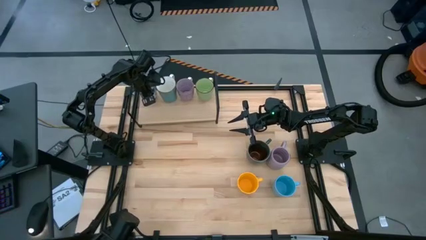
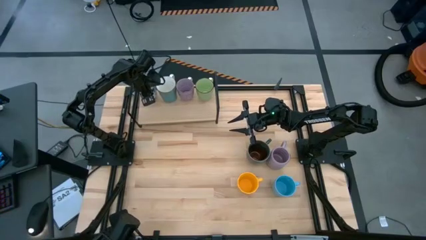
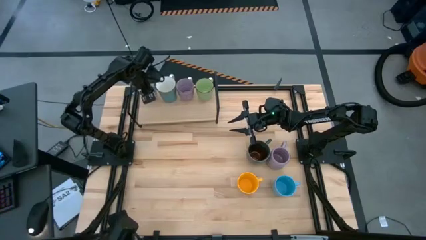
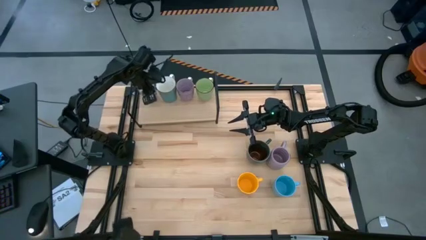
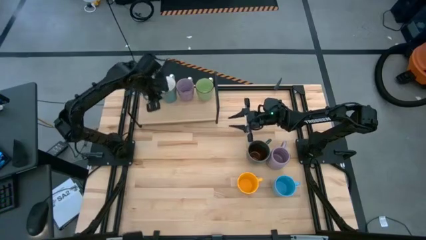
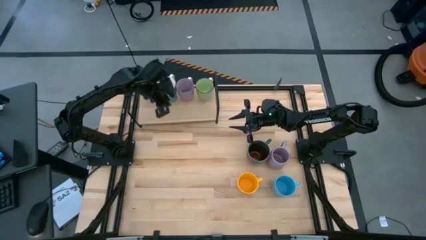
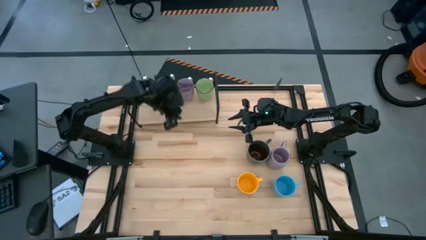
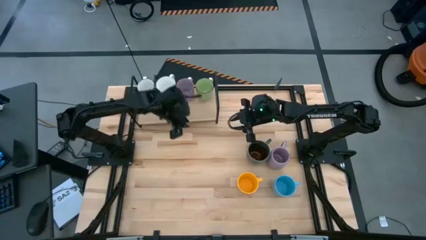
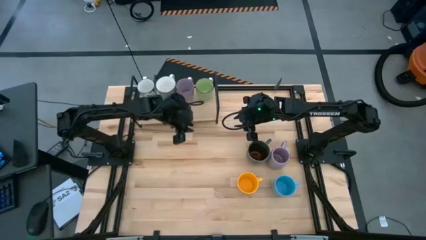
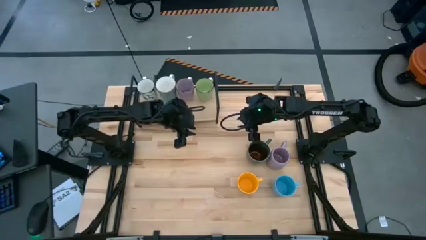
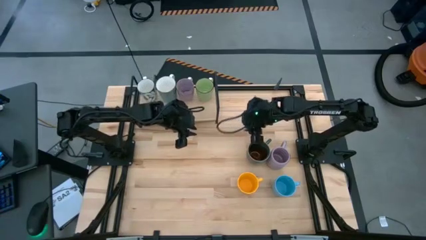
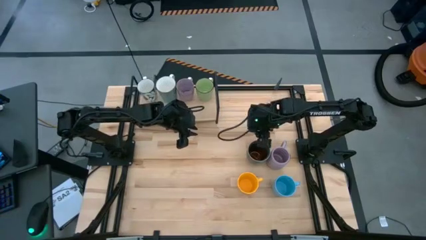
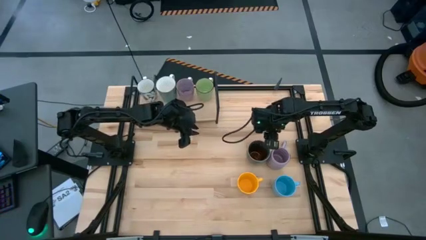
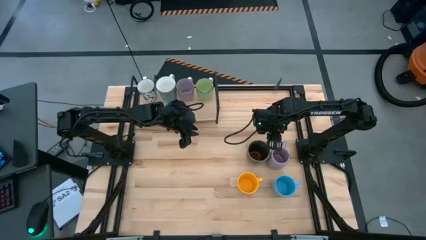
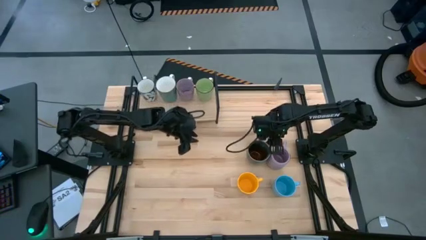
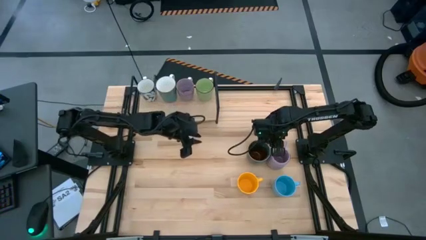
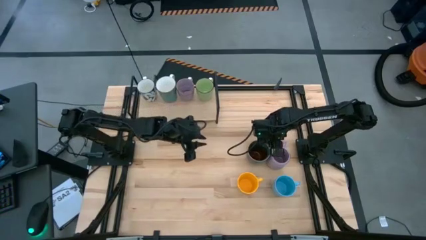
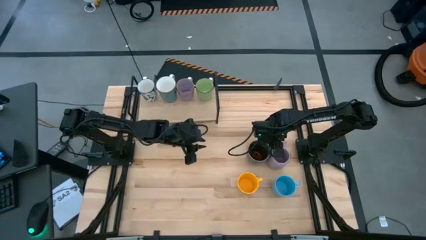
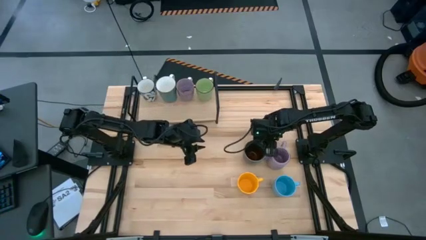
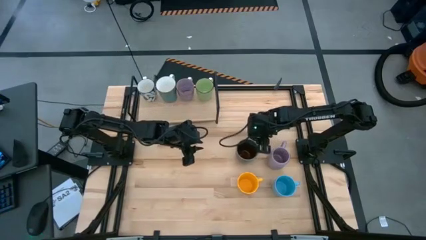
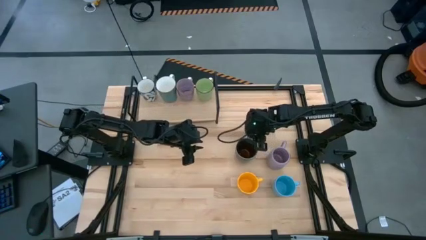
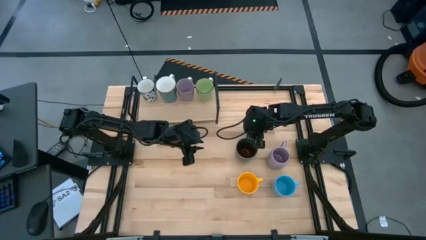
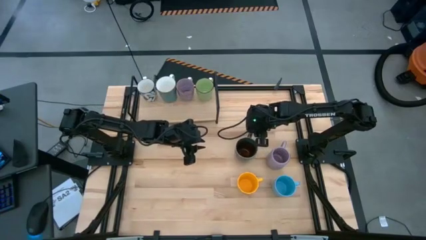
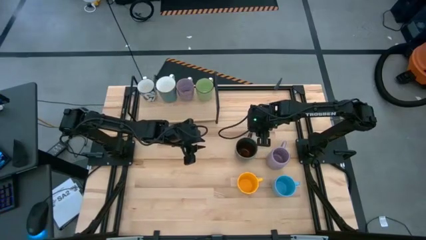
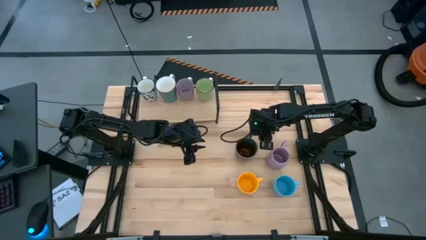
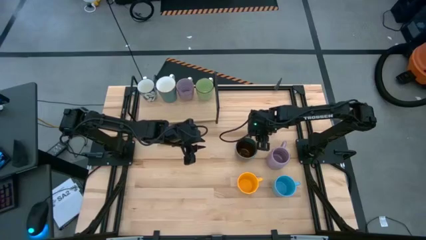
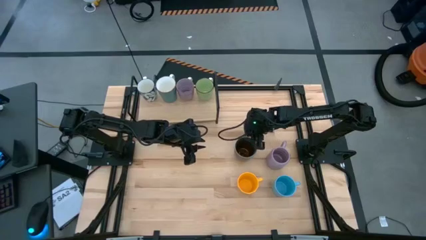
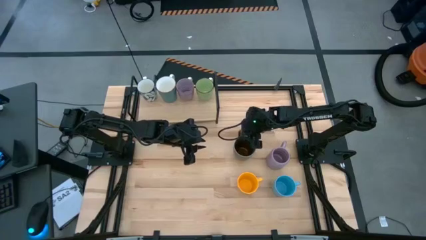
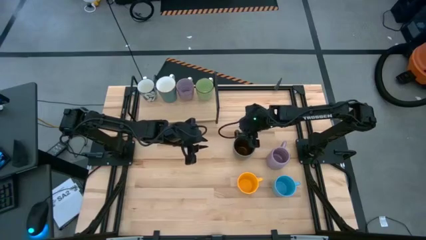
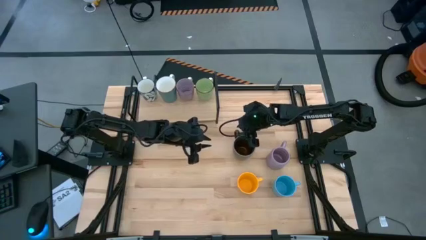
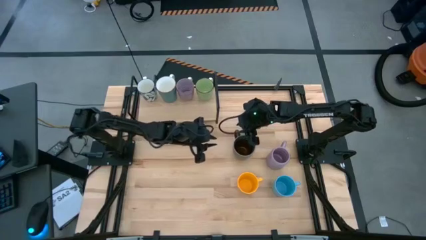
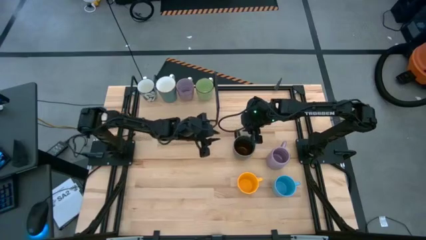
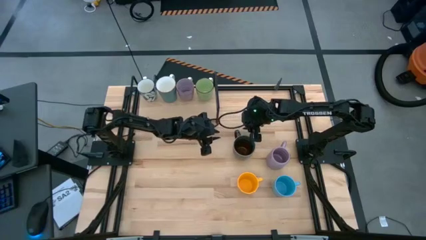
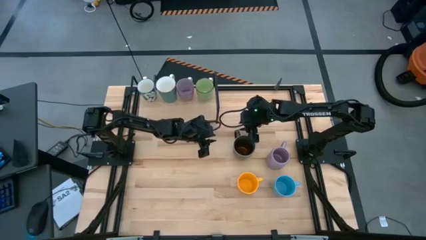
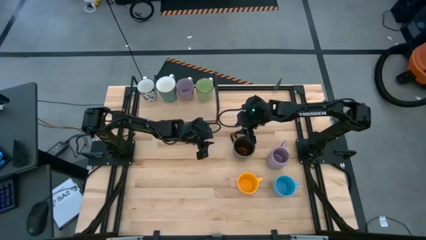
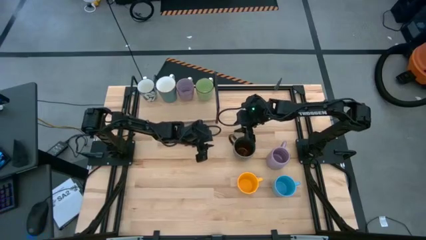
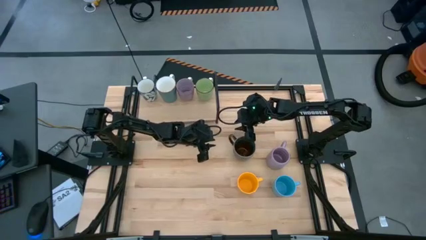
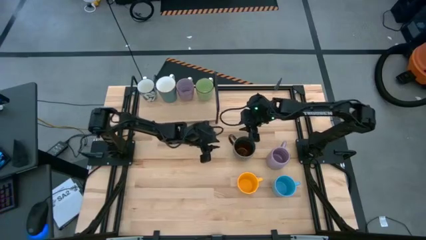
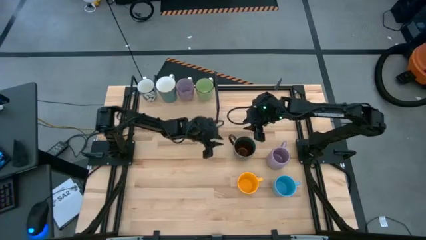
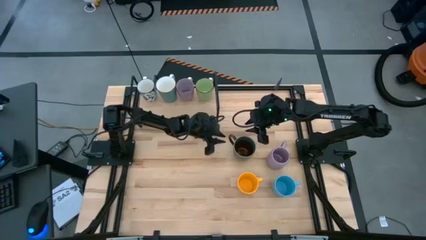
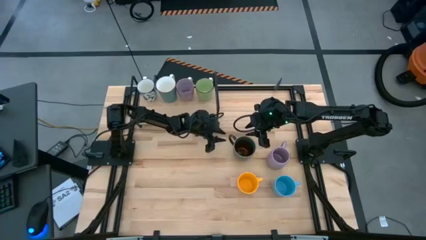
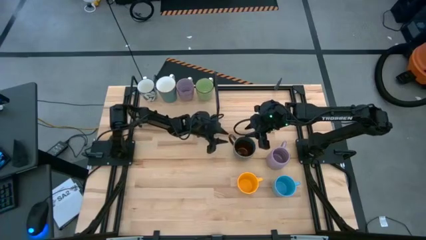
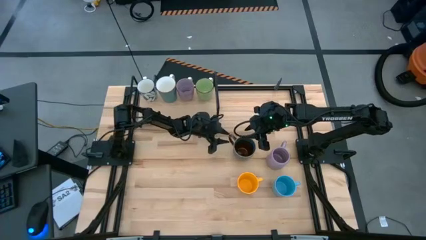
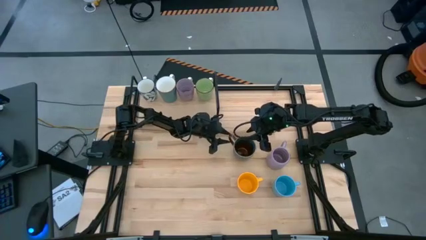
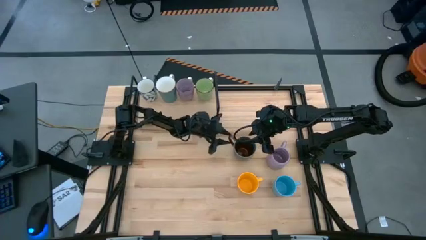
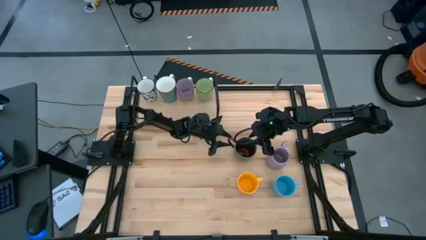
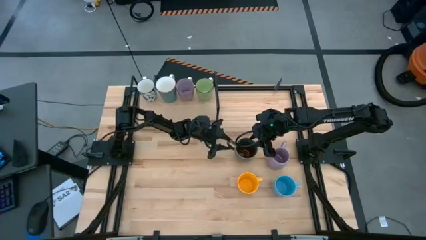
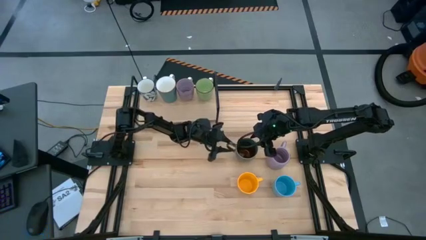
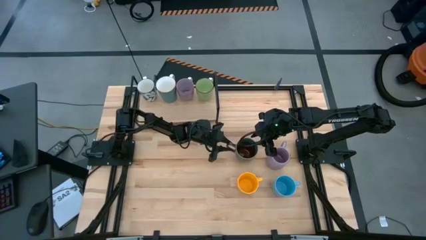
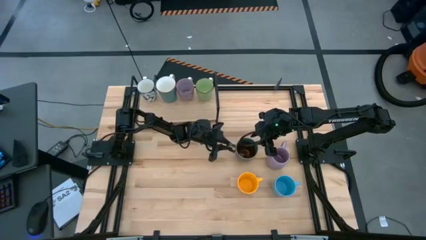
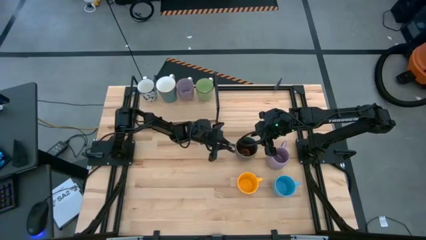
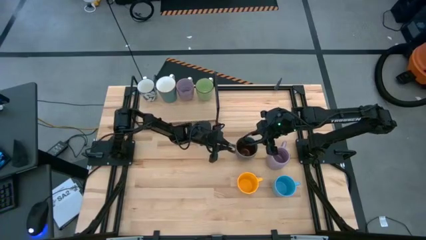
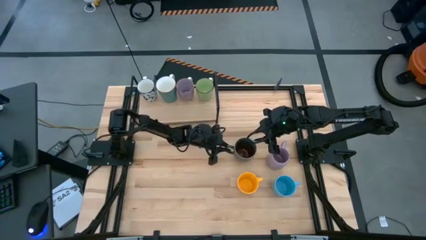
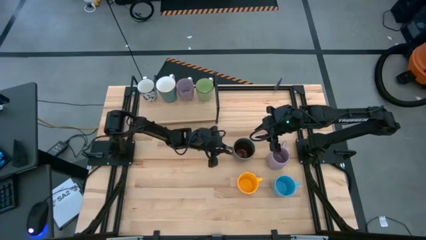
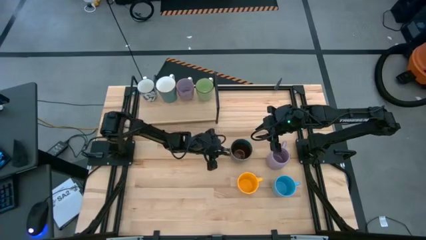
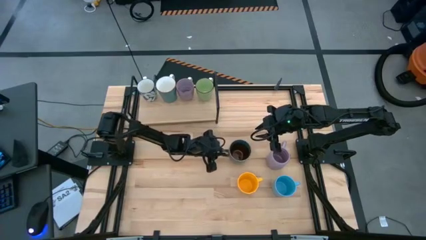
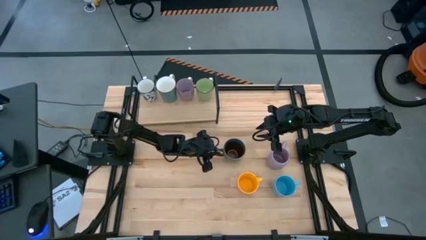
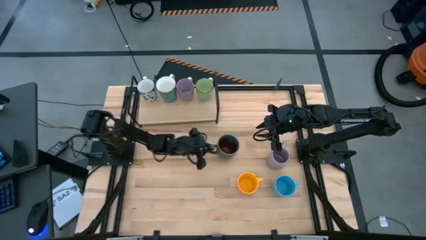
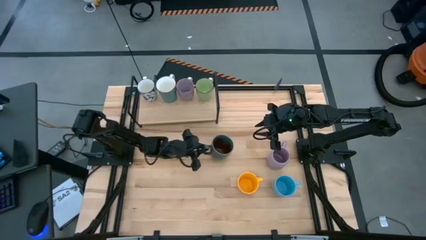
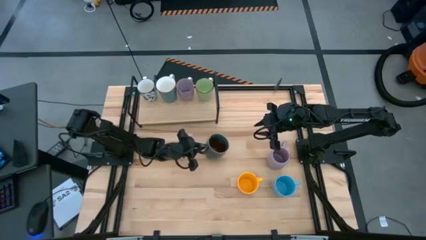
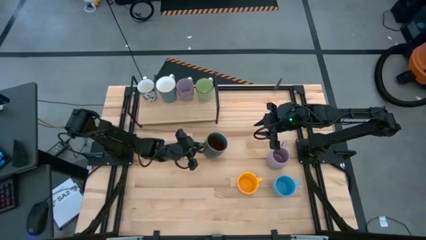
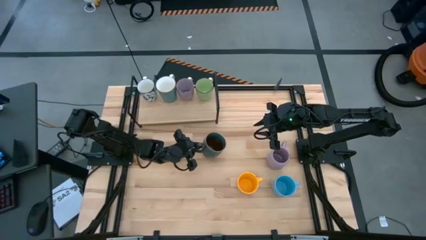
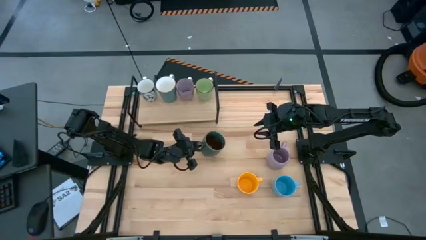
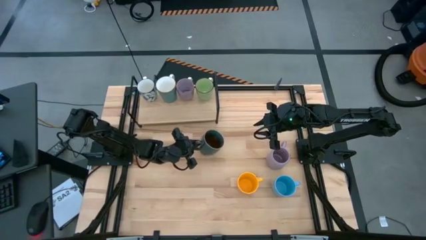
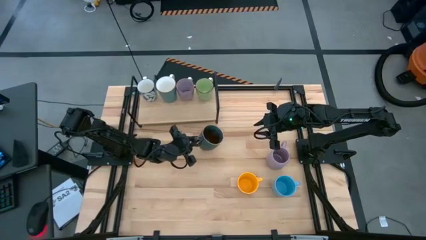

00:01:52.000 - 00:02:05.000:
Task: Place coffee mugs
Put the dark blue patterned mug on the shelf

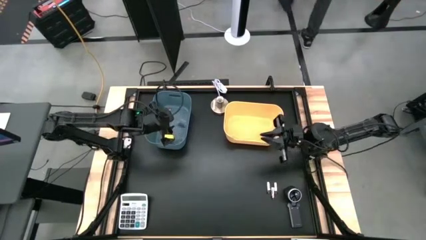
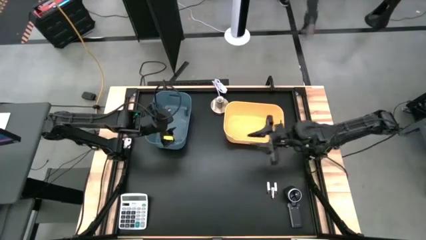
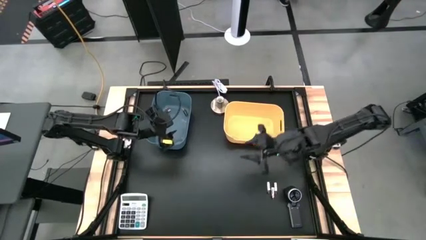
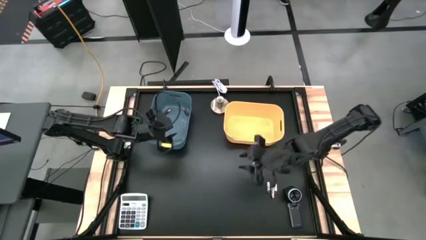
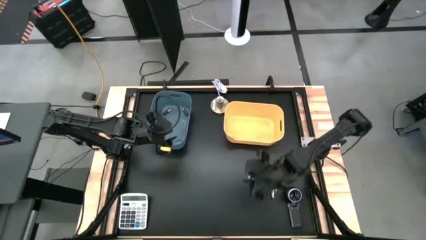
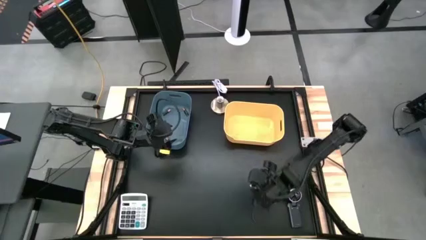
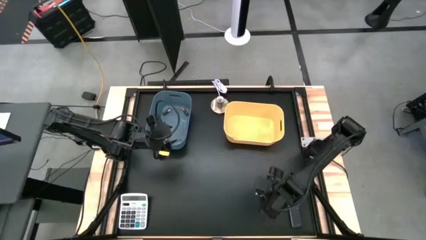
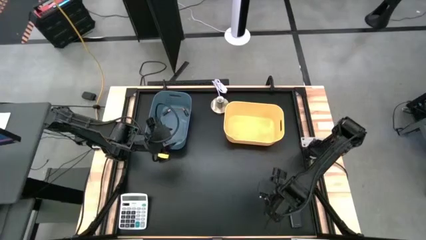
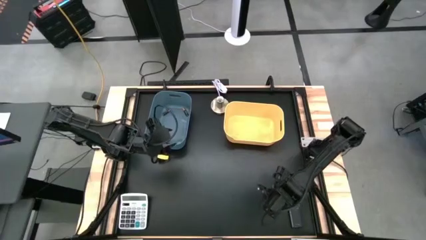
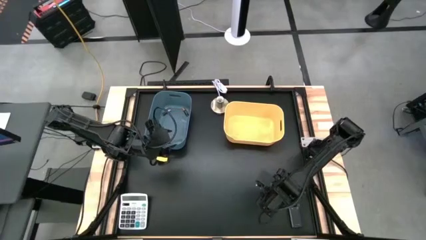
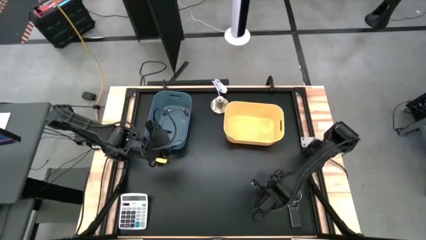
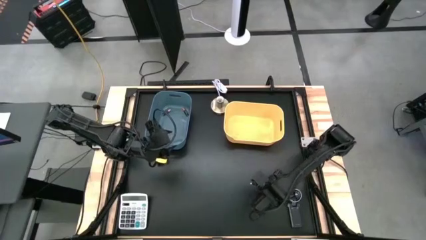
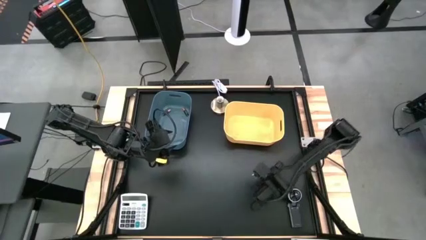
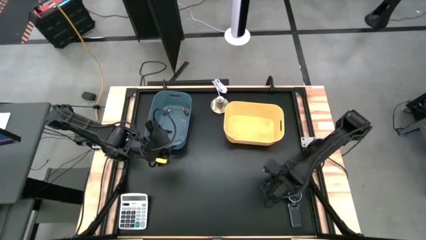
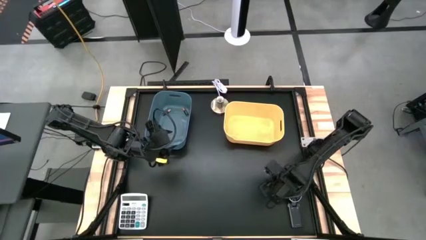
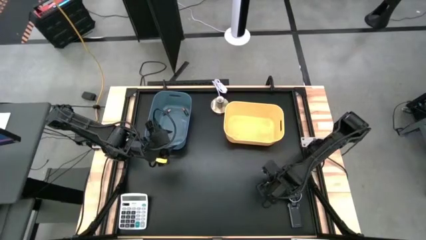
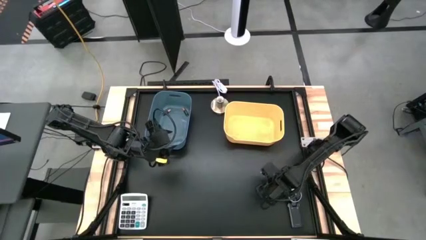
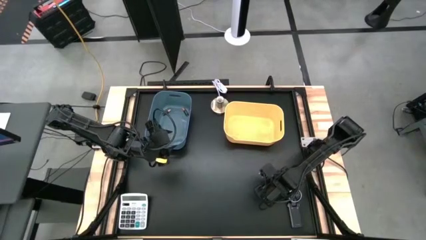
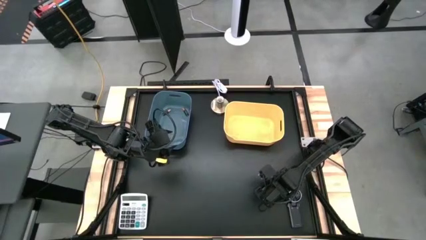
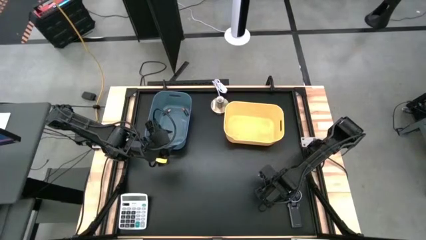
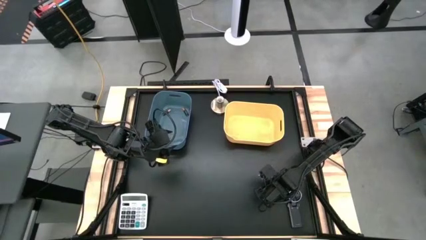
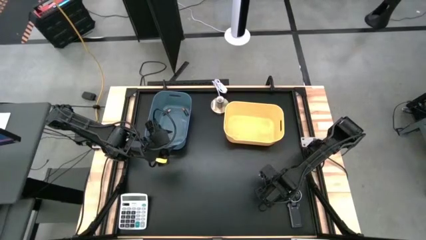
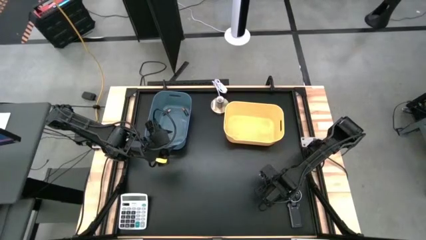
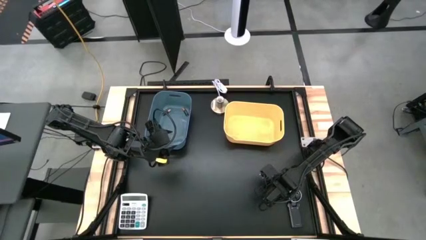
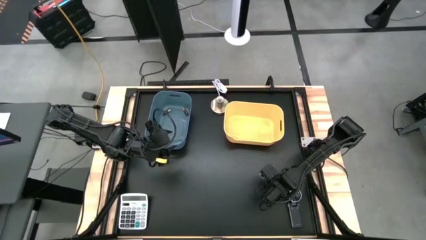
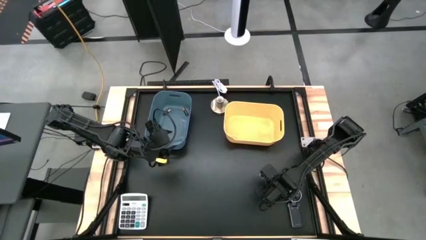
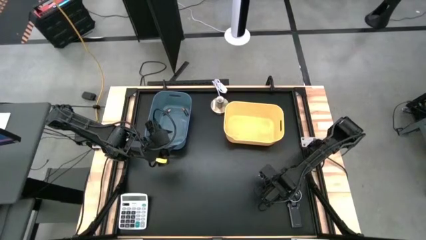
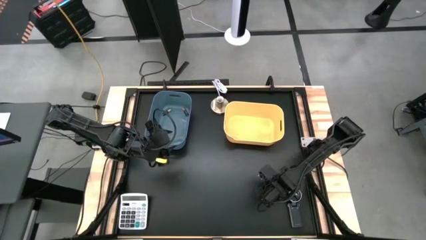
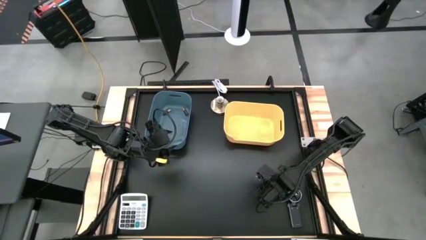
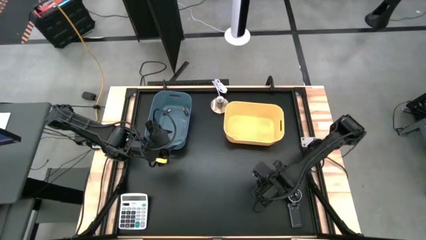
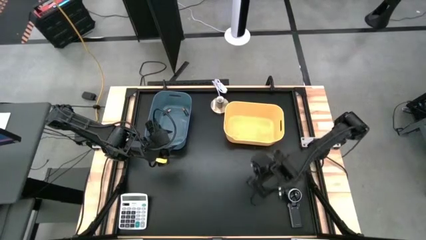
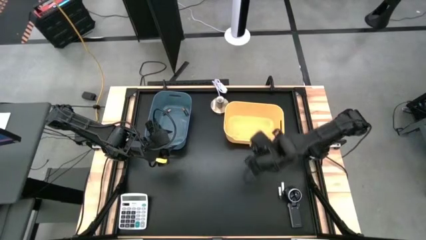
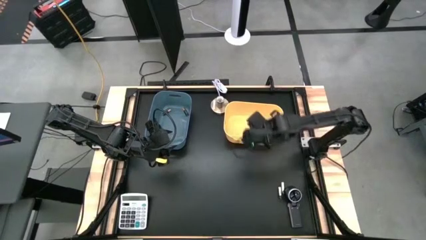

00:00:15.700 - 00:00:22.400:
Task: Sort batteries
Put the left silver battery into the yellow bin
